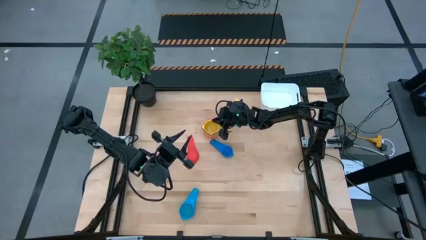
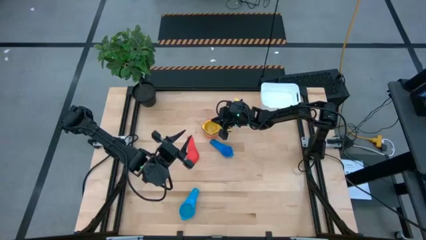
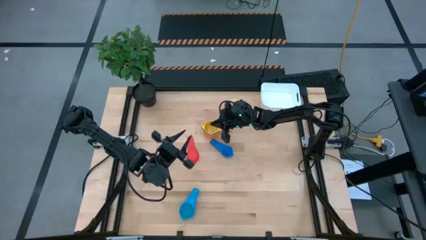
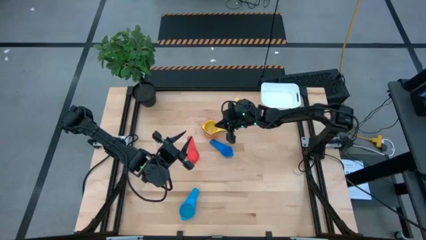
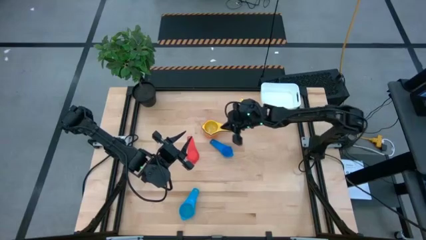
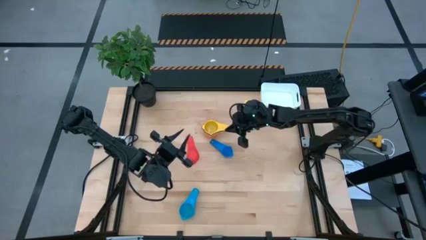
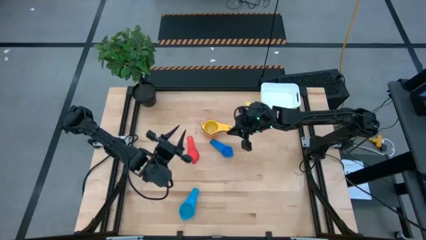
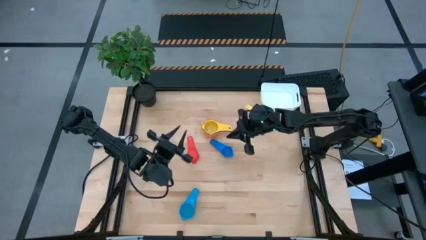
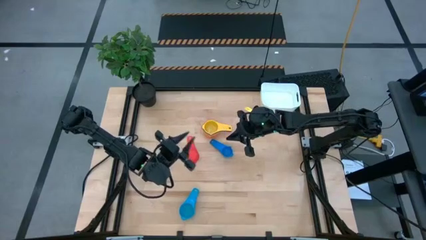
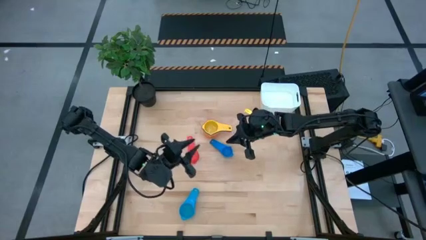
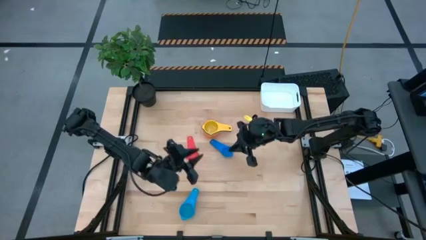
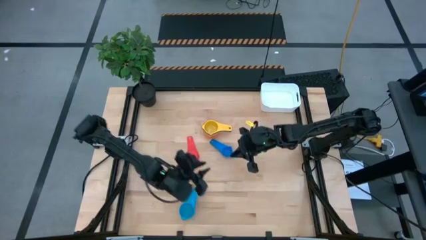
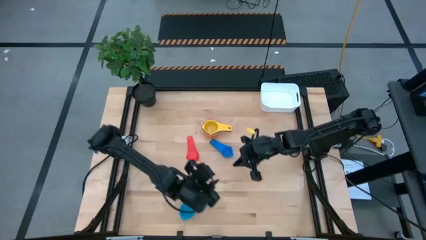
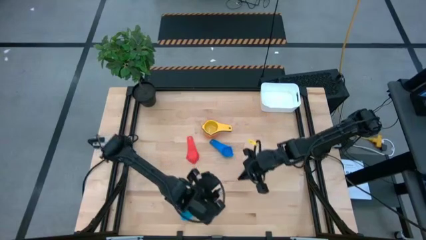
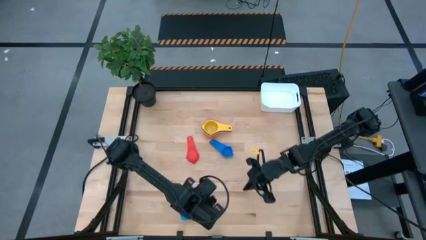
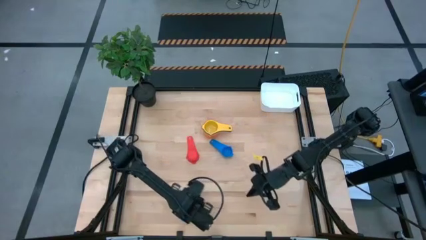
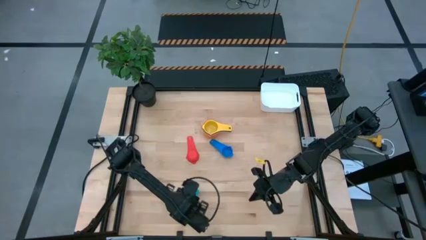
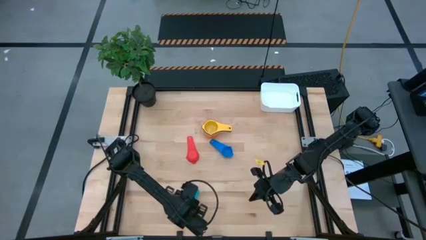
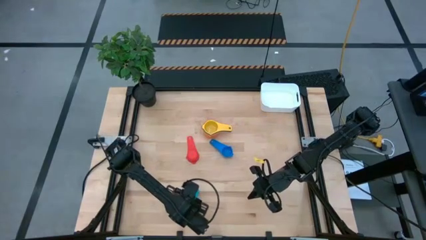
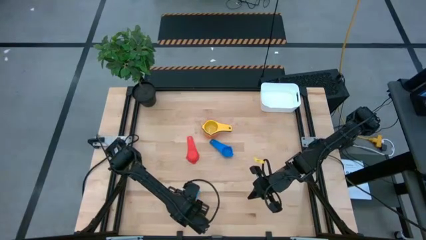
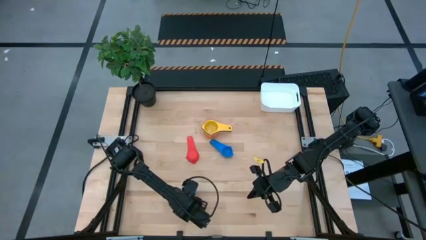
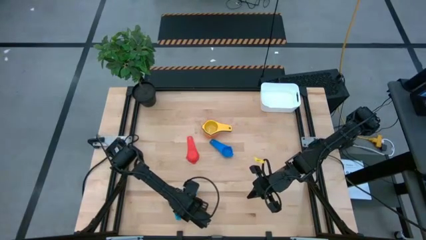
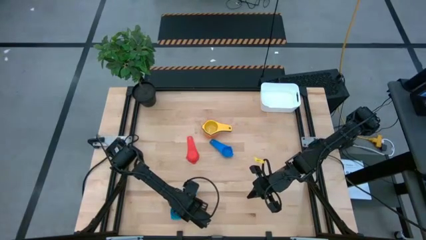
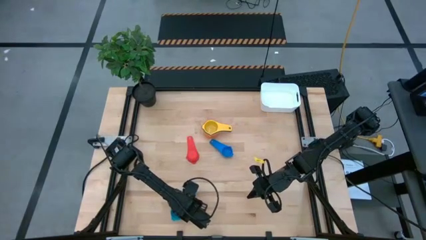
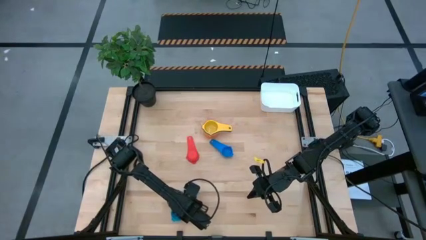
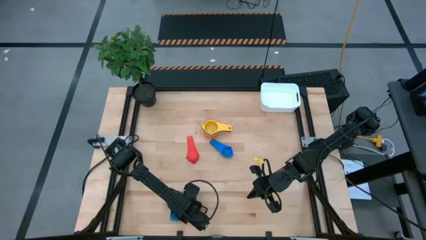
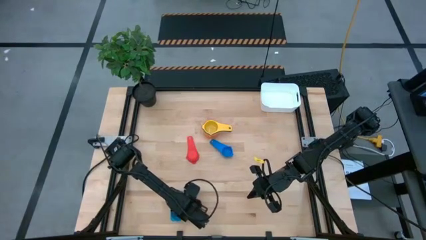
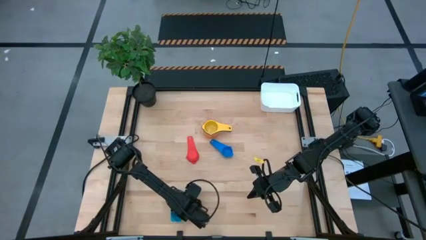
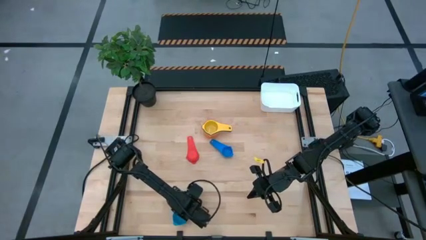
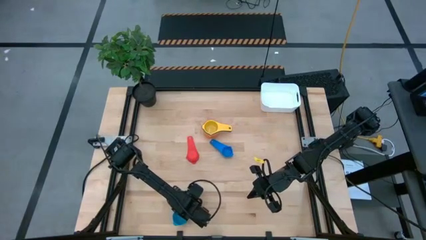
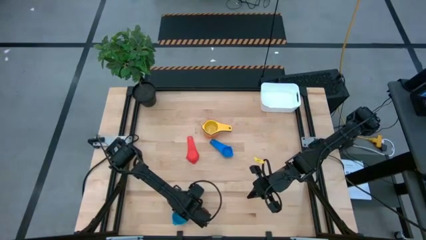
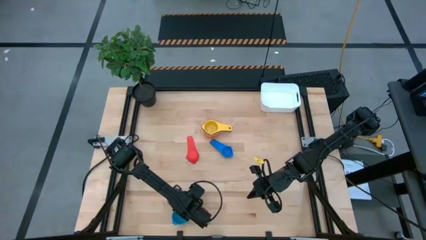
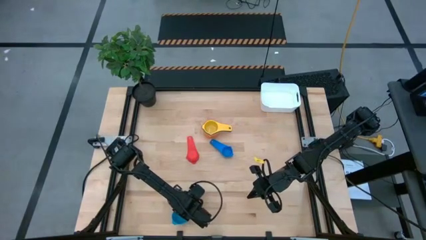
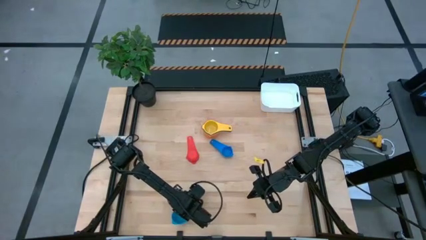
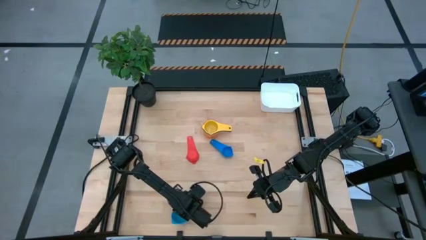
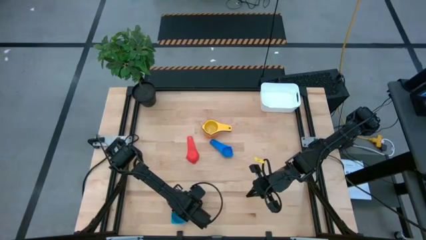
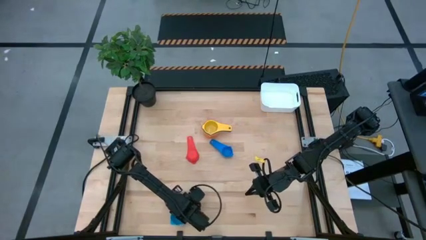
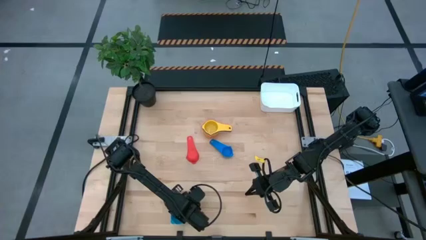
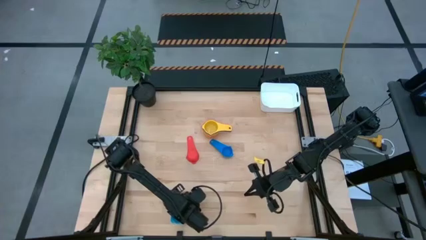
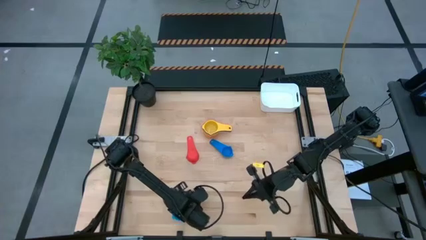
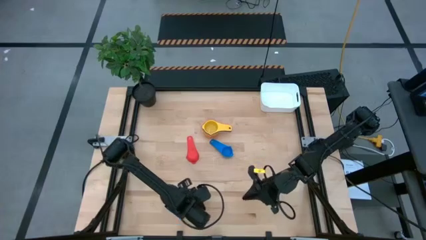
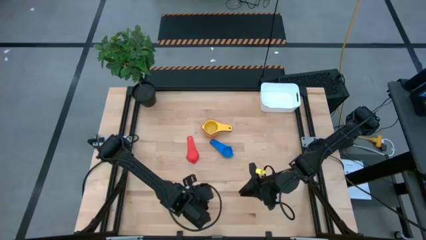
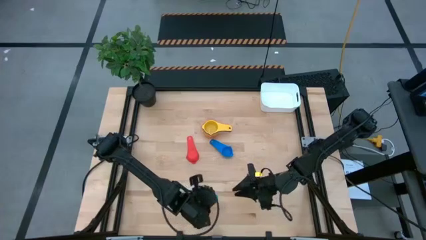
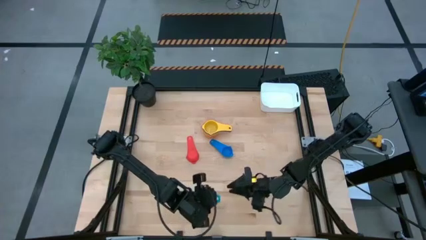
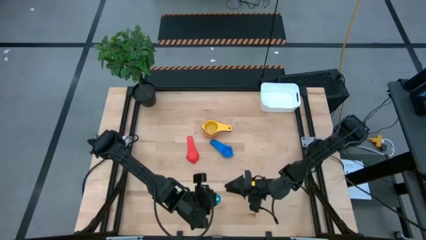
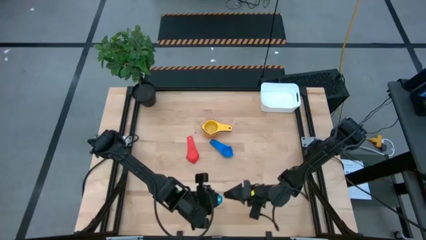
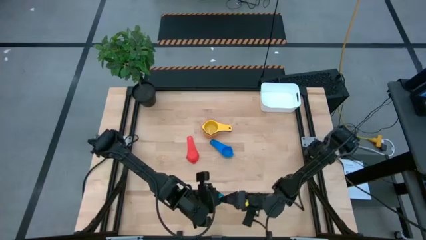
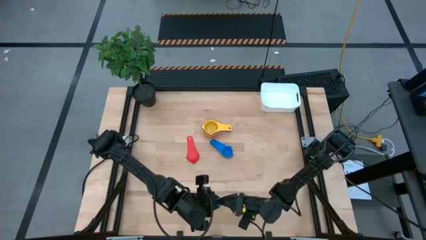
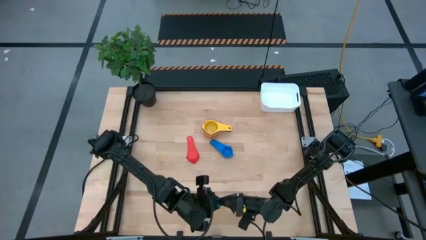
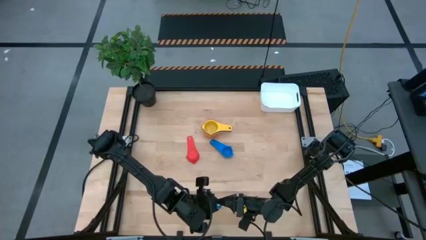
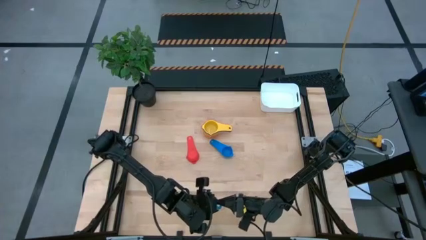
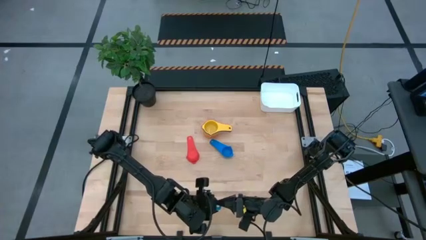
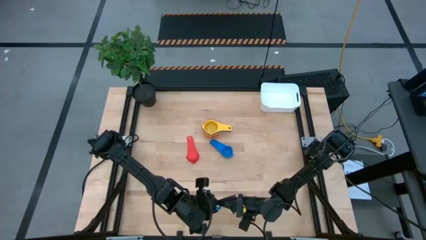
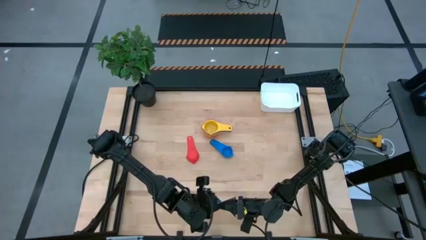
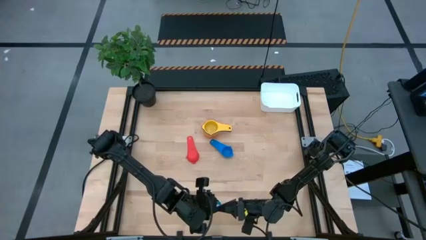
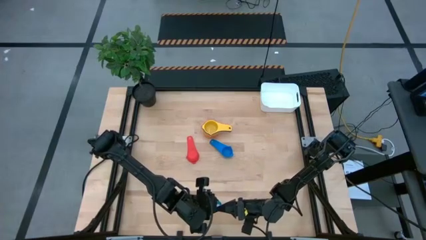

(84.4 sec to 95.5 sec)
Task: Nest measuring cups in basket
Stack the light blue measuring cup into the yellow measuring cup
